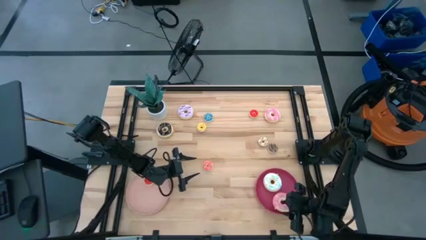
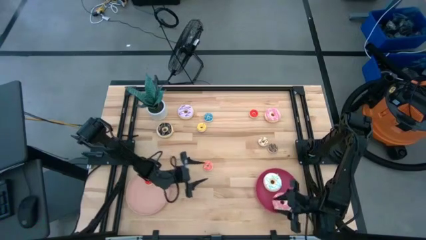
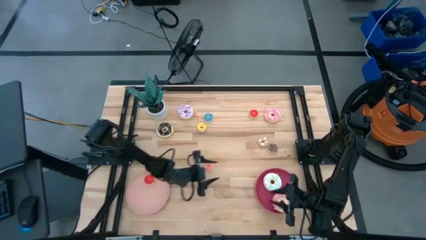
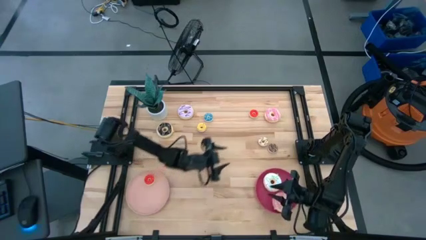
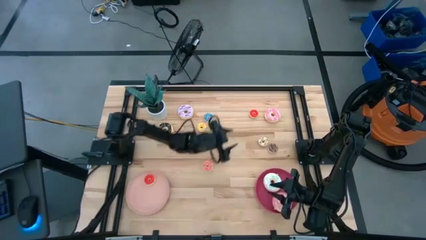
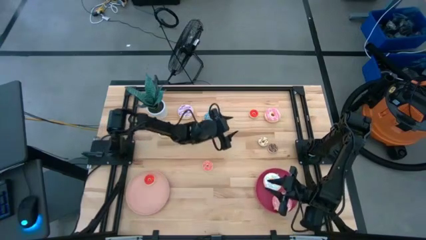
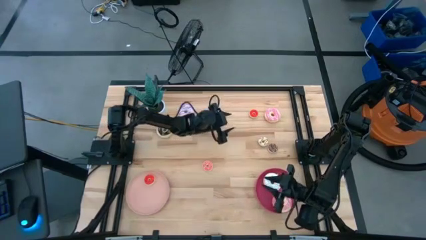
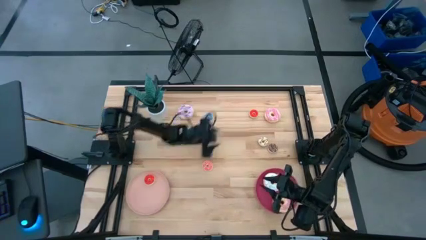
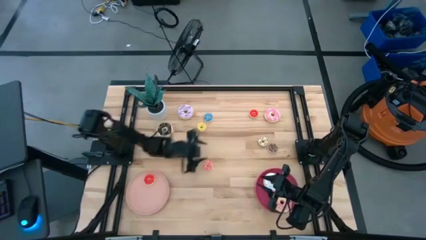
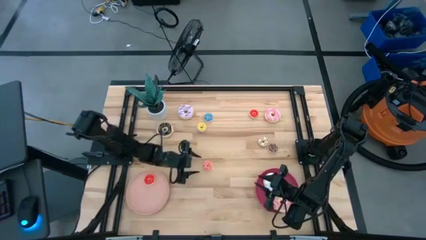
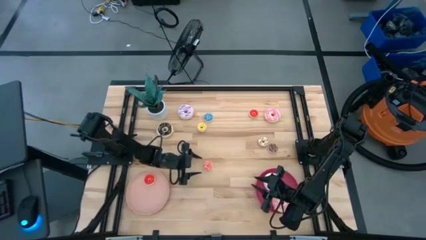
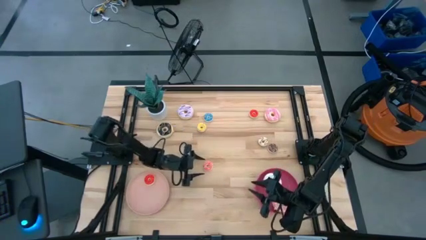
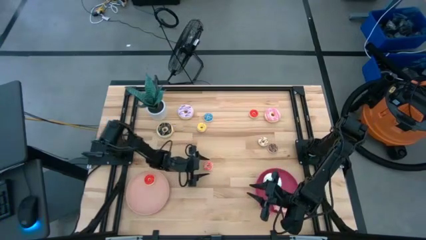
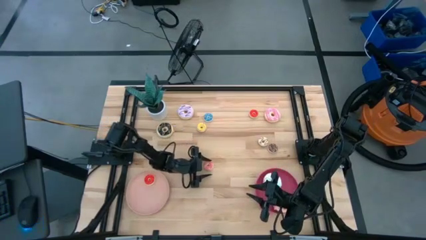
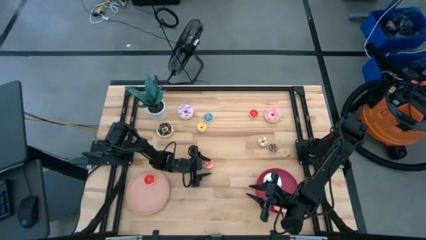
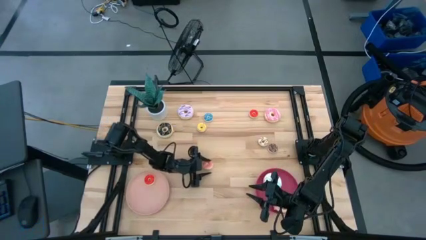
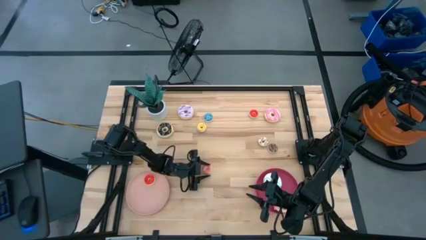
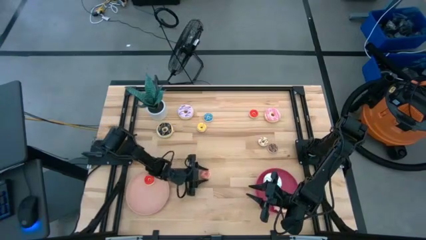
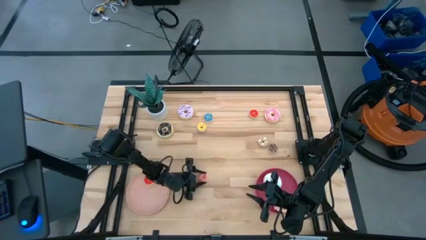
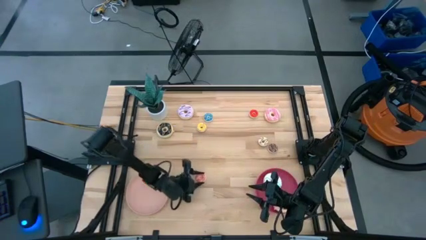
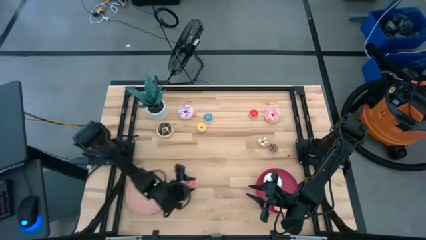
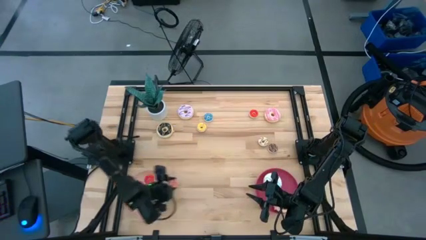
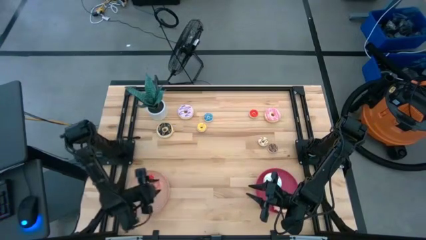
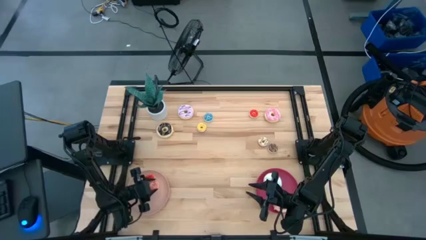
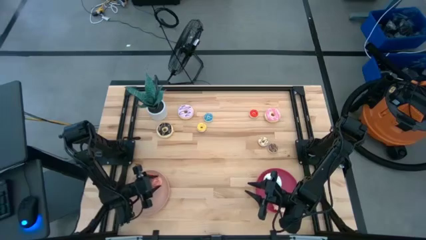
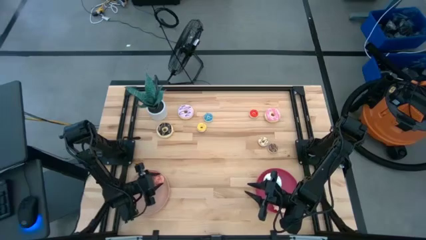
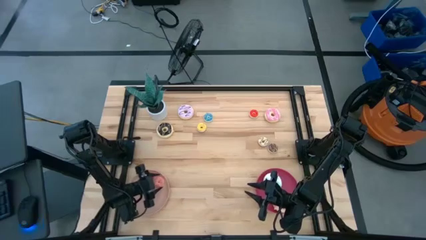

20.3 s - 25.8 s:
Task: Pick & Place donuts
Put the small pink donut on the light pink plate

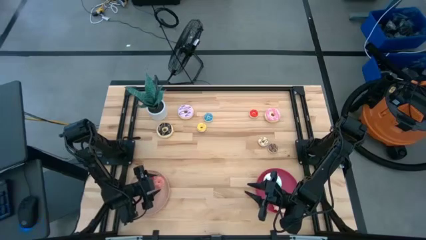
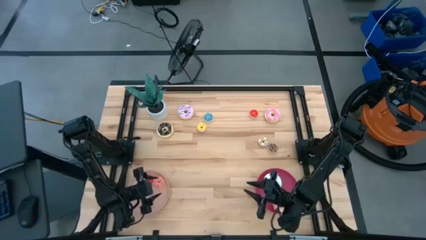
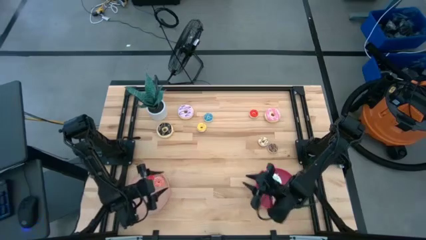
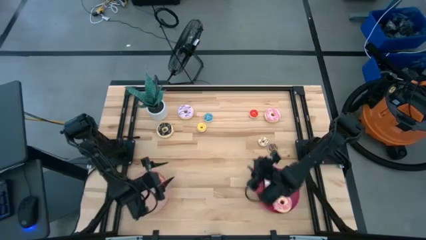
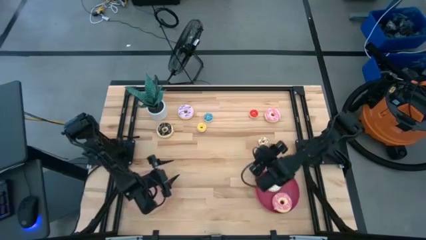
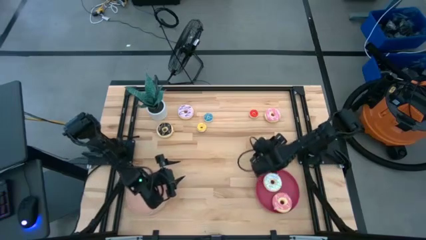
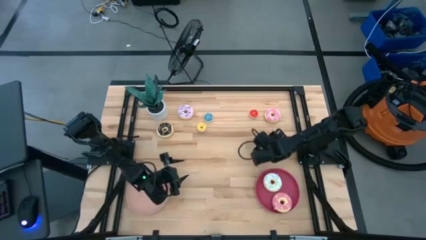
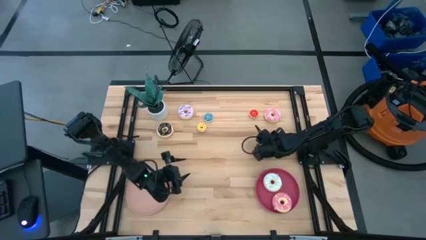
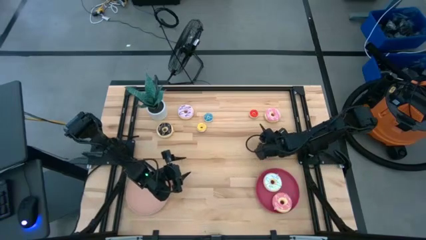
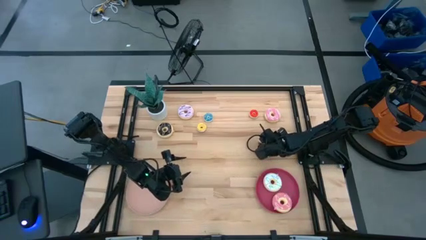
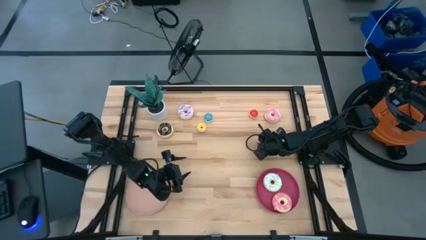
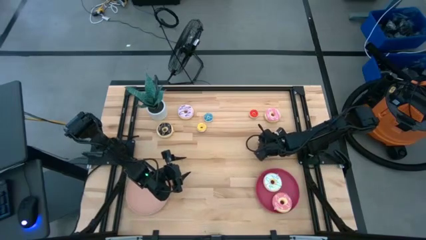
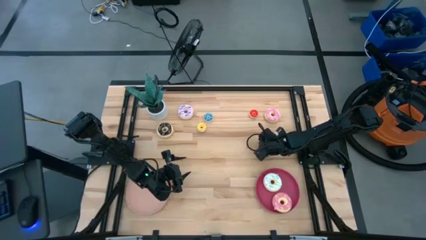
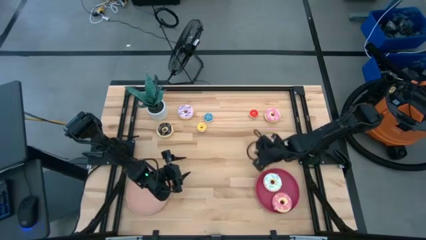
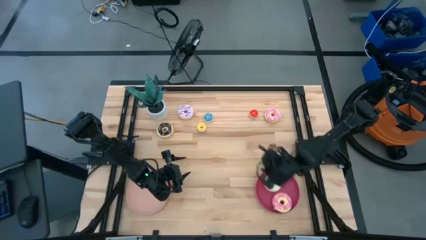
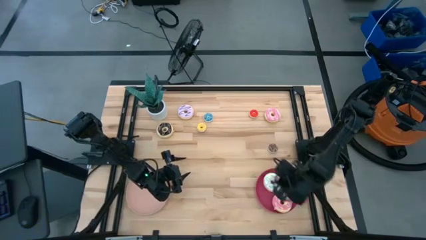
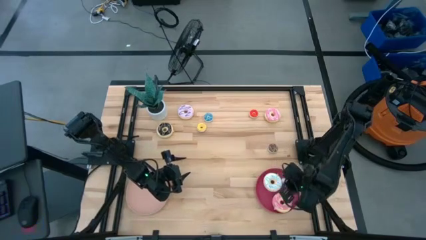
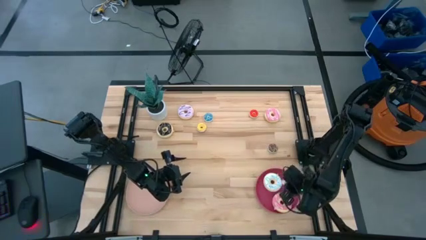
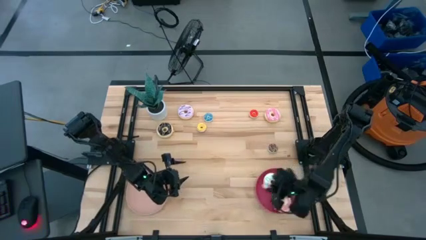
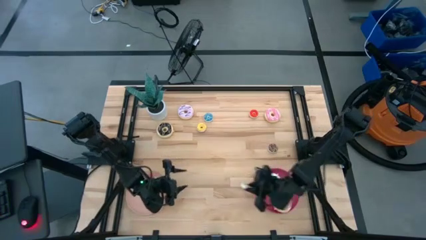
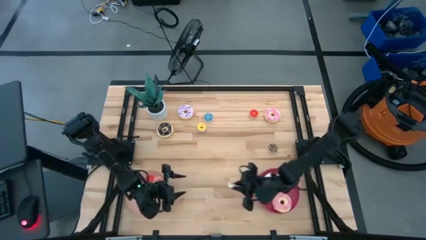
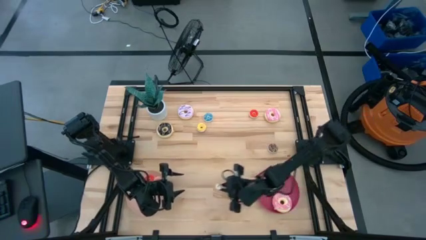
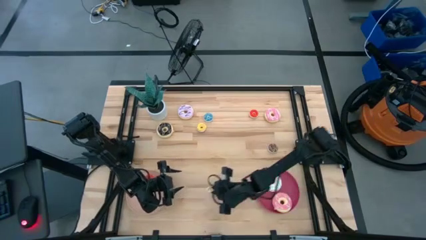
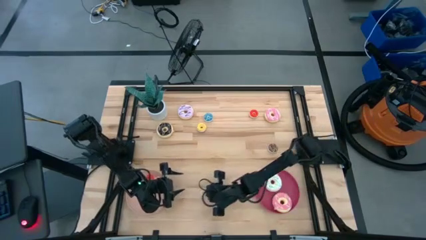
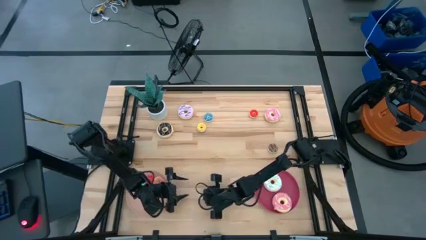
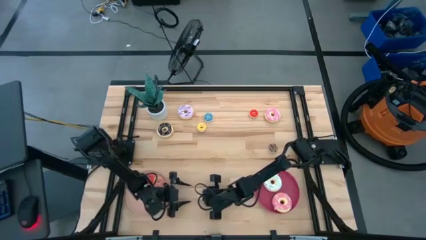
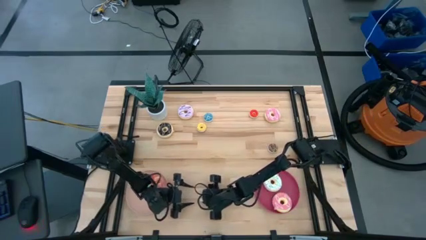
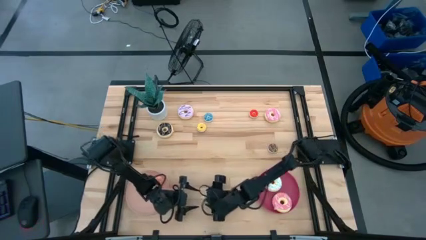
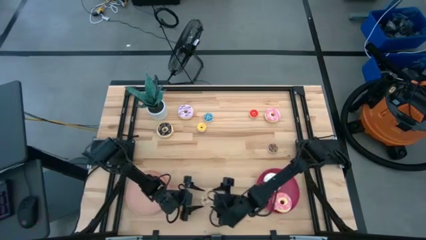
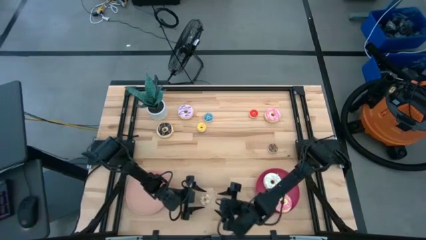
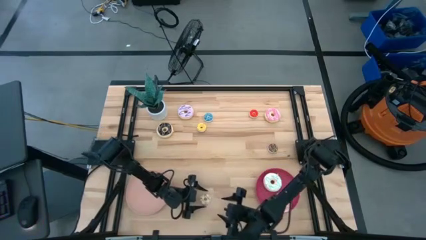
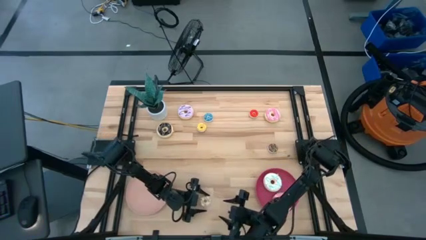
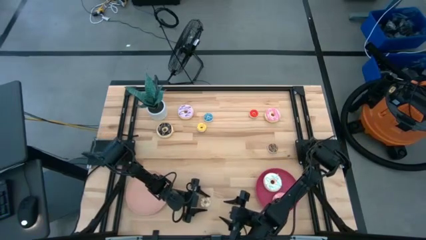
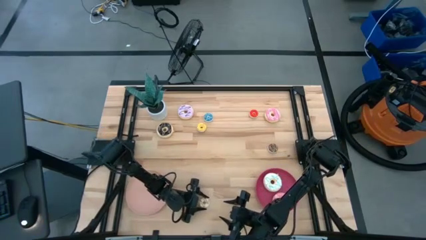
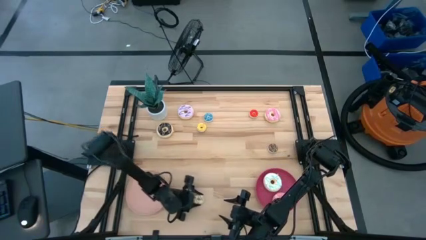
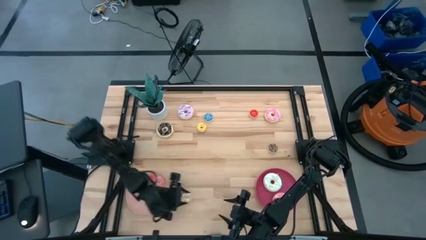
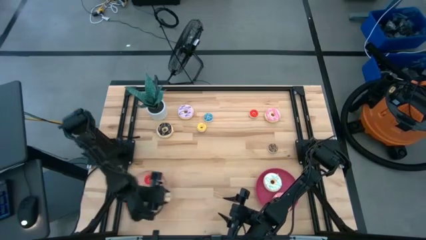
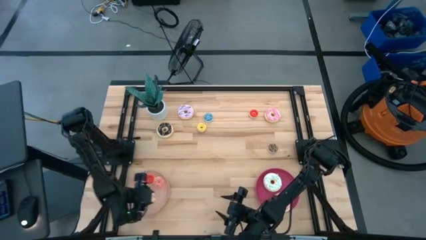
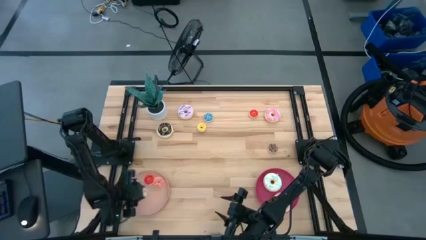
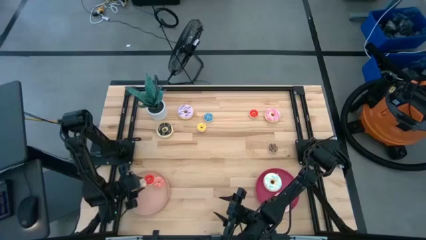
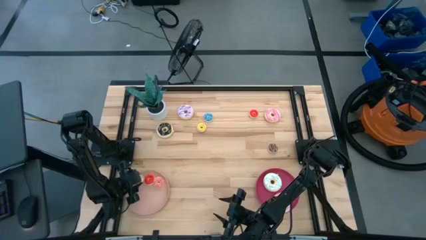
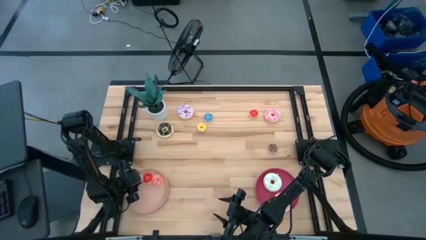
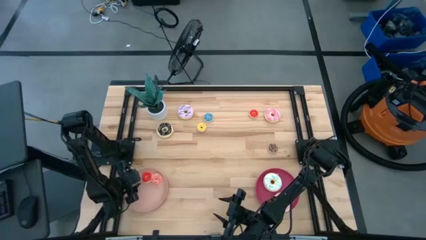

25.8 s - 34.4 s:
Put the small white donut on the light pink plate

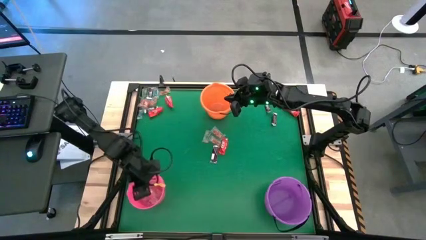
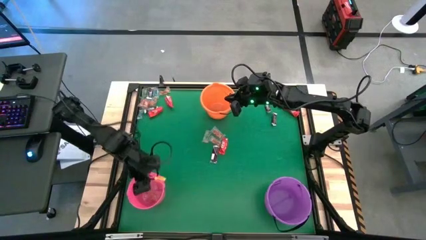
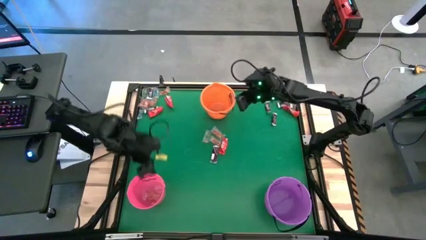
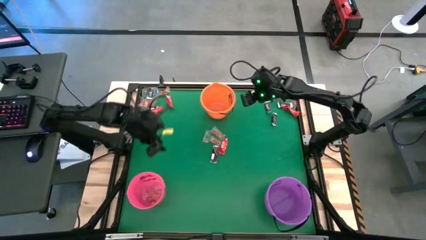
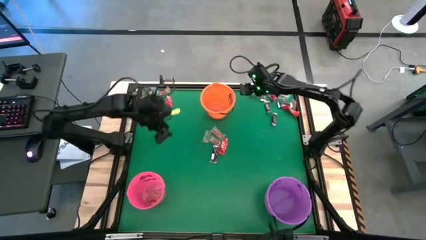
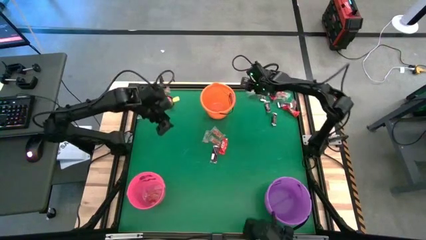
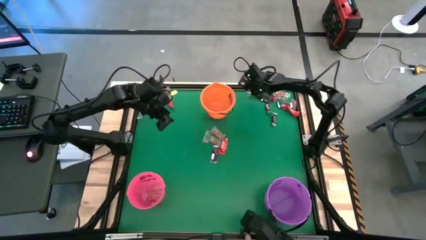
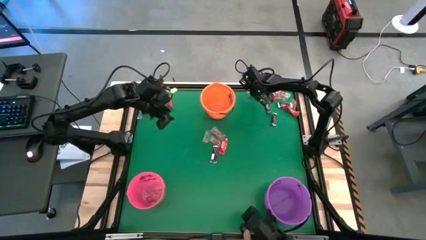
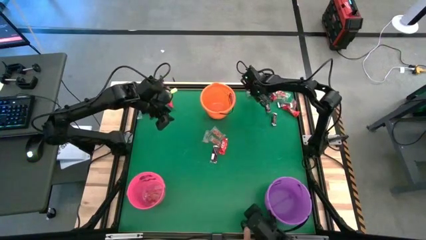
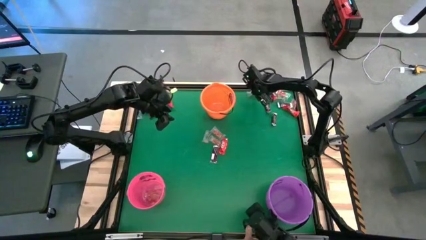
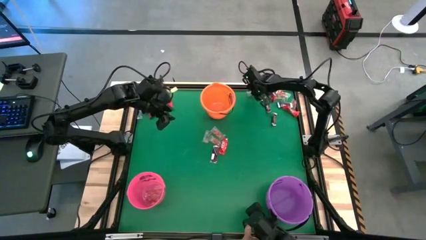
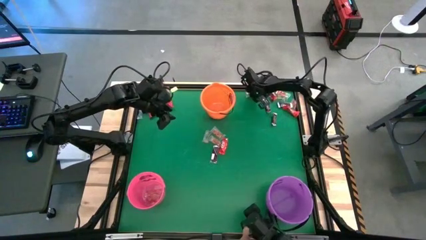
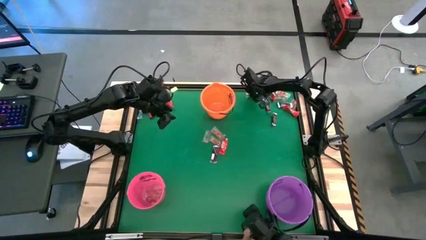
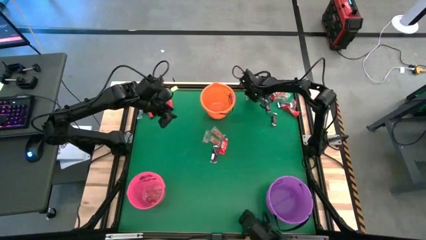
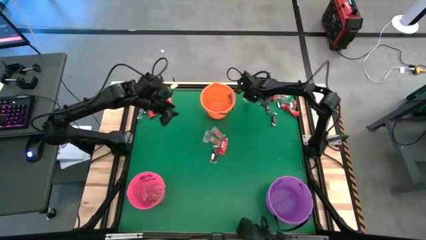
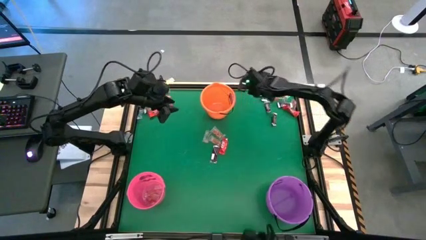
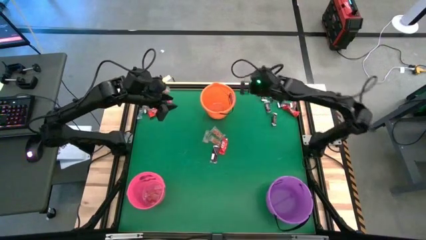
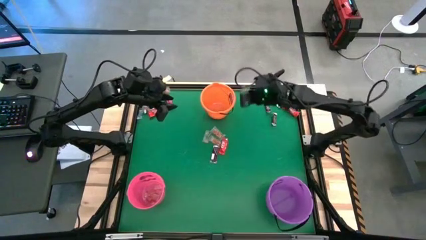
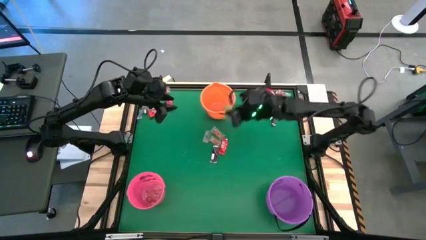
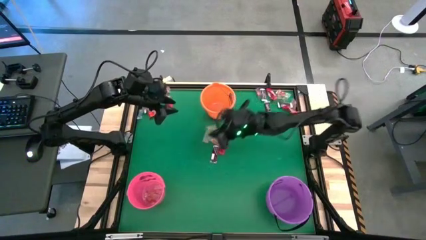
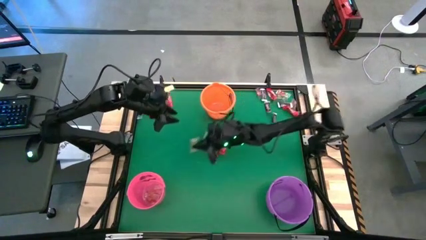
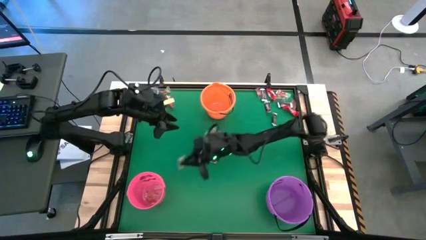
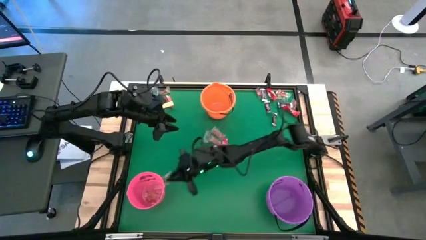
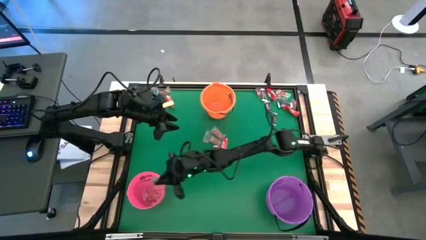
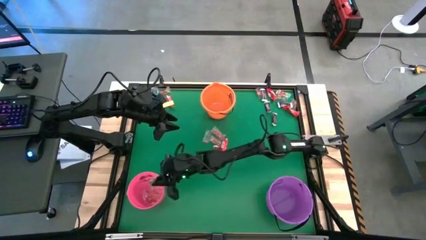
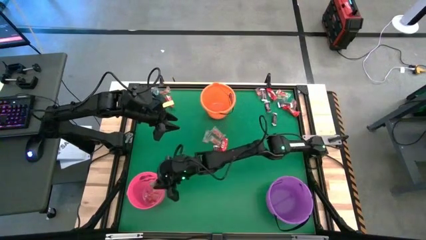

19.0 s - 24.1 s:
Task: Sort candy by brand, put in halloween buckets
Put the green gummy into the pink bucket
